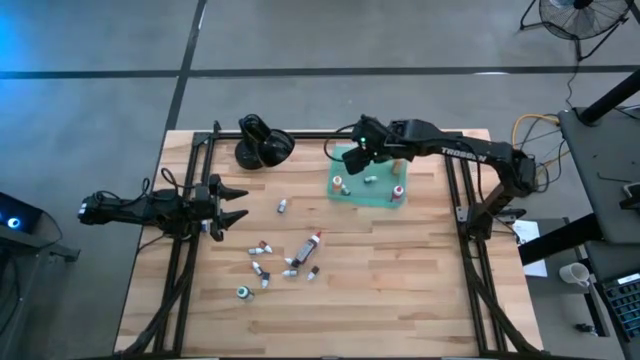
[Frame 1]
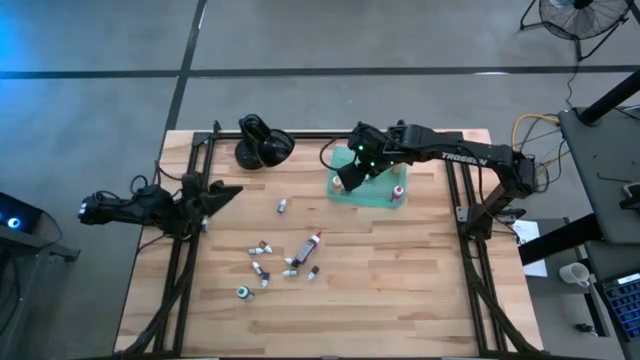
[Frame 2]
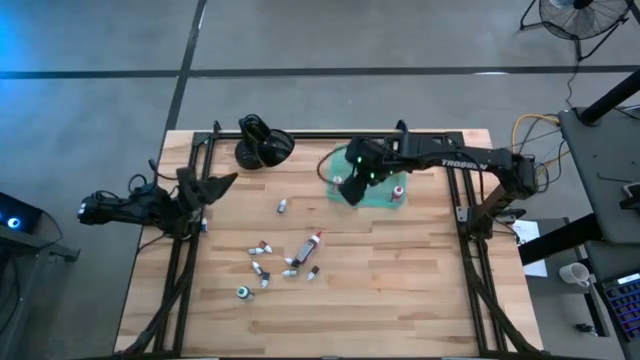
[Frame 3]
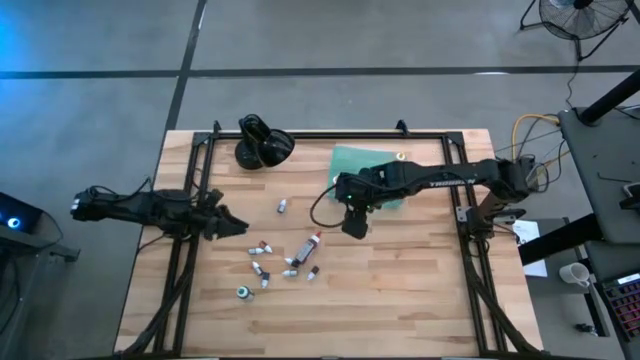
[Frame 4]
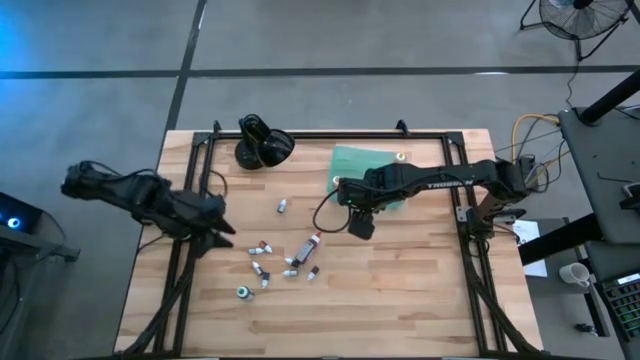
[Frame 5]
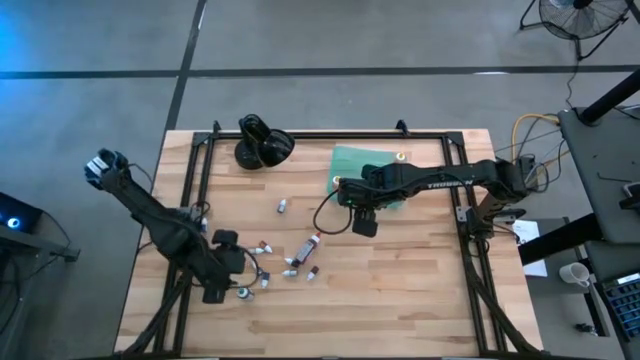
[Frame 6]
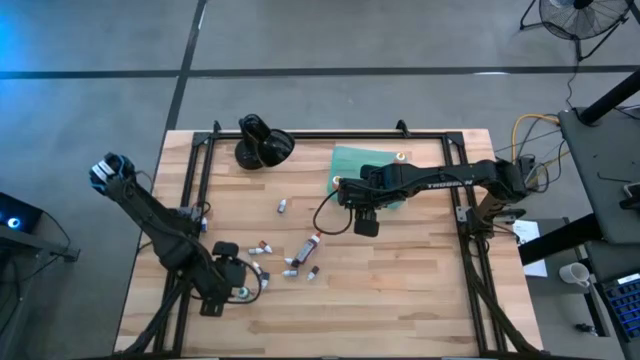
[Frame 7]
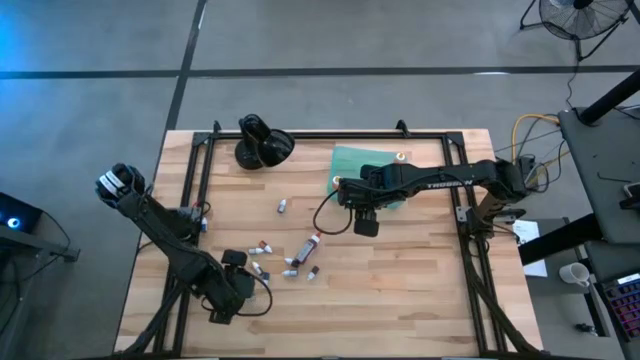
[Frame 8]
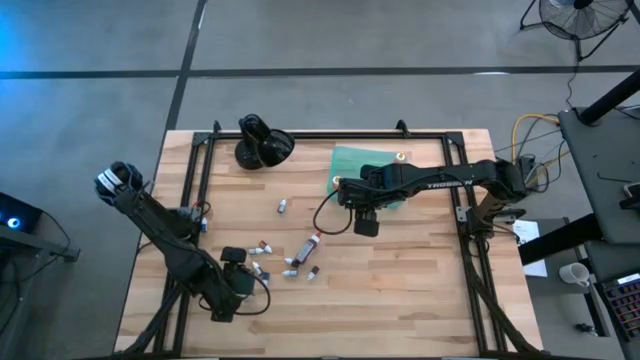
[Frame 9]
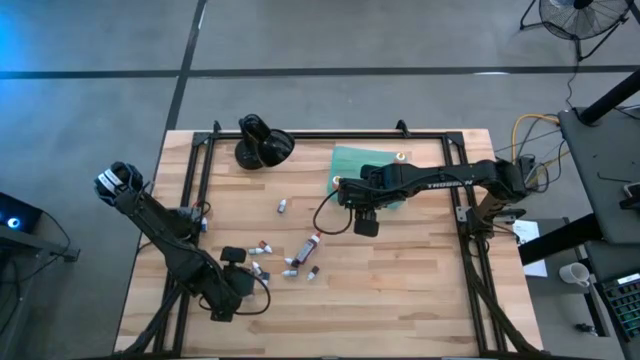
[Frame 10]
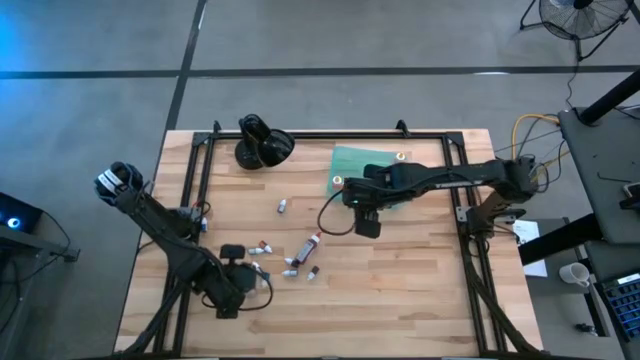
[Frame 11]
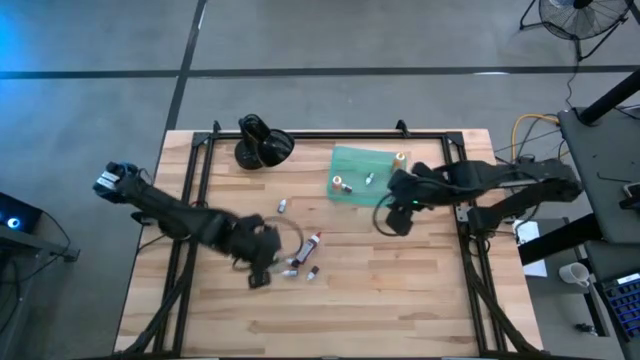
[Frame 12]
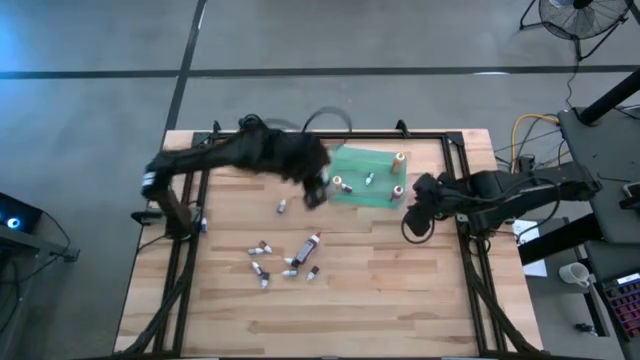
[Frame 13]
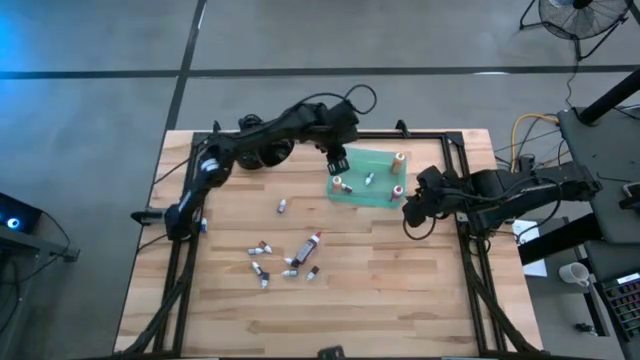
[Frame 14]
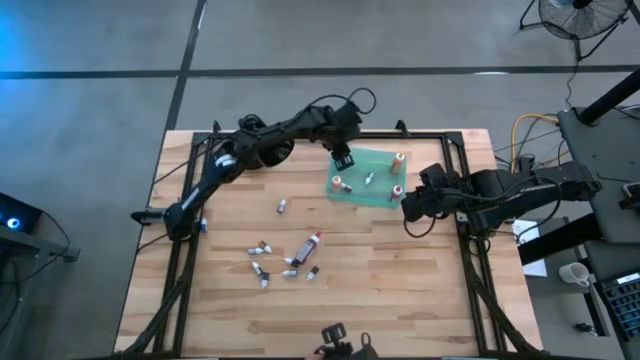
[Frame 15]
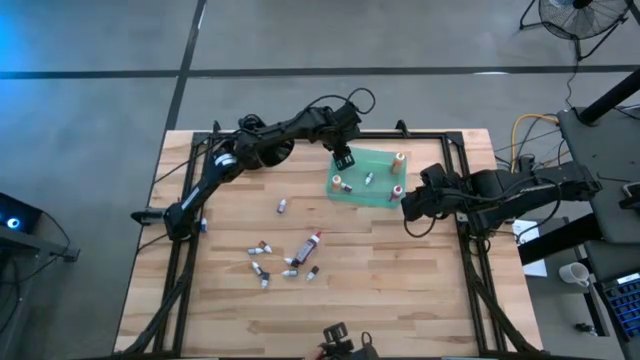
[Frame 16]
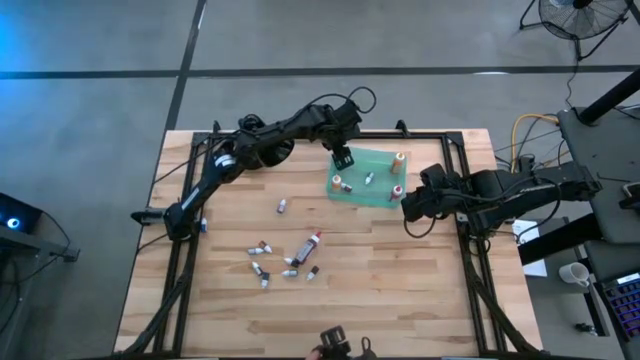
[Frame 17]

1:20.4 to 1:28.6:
Task: Pick & Place food coloring
Put the large green food coloring bottle into the green bin

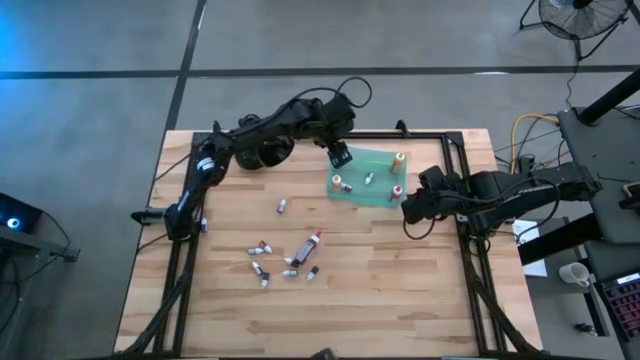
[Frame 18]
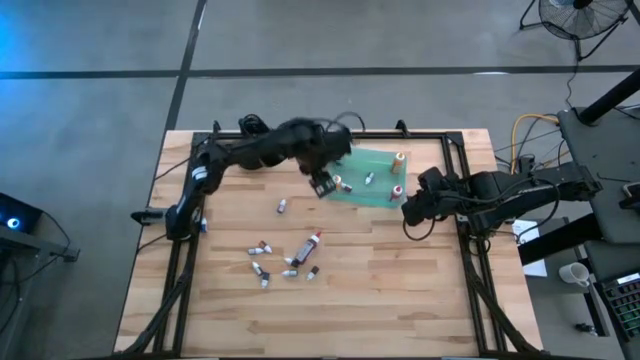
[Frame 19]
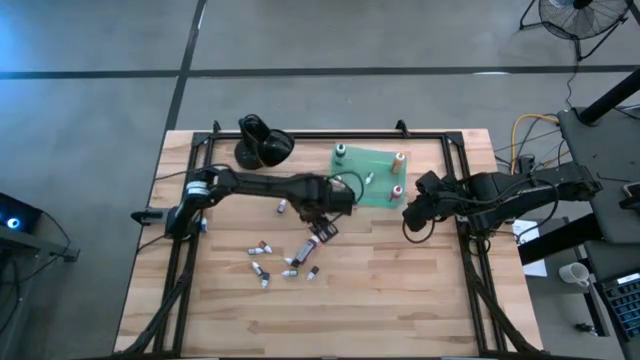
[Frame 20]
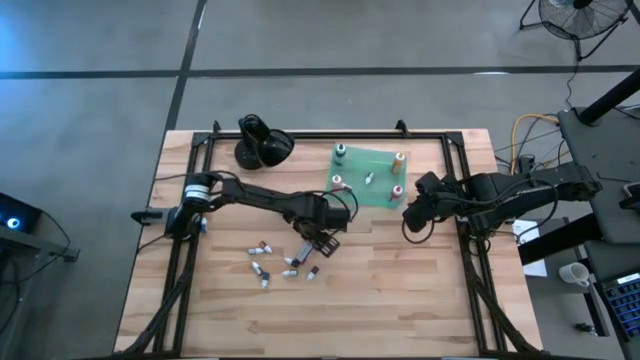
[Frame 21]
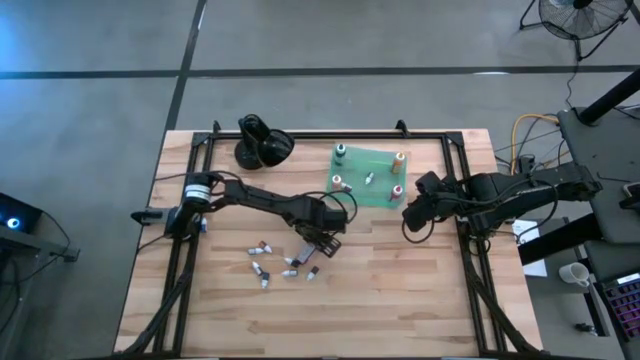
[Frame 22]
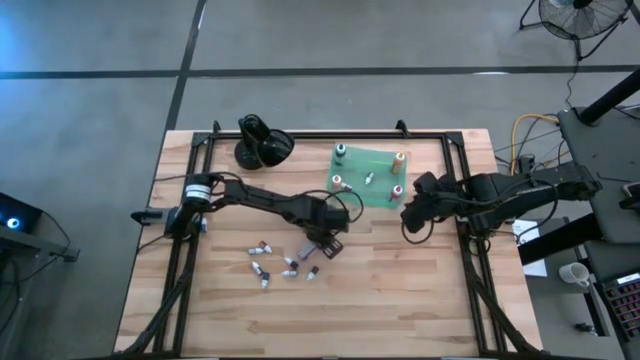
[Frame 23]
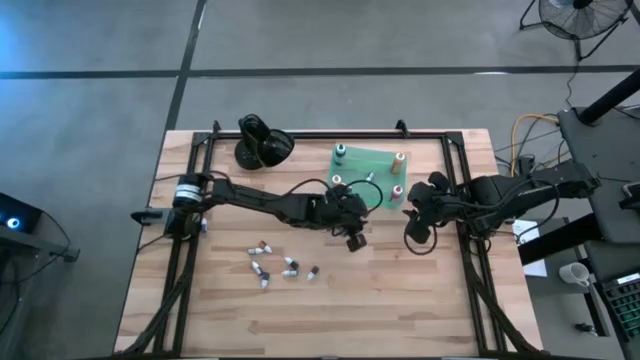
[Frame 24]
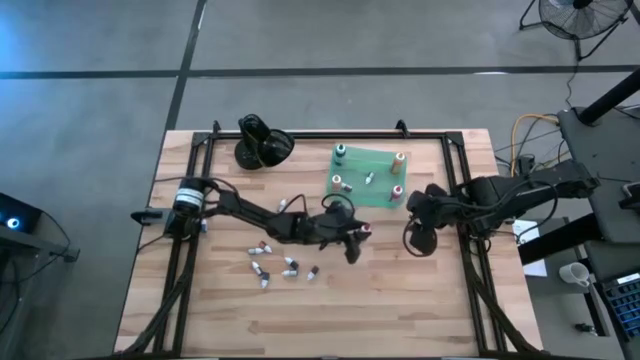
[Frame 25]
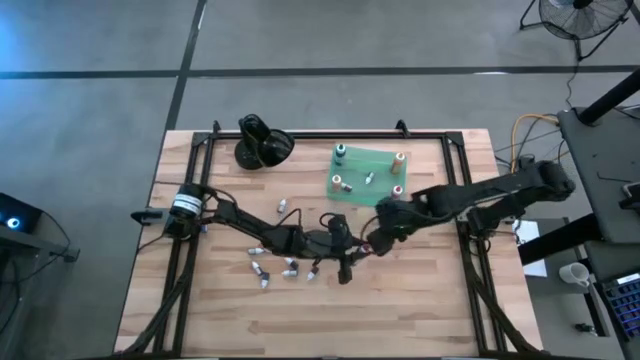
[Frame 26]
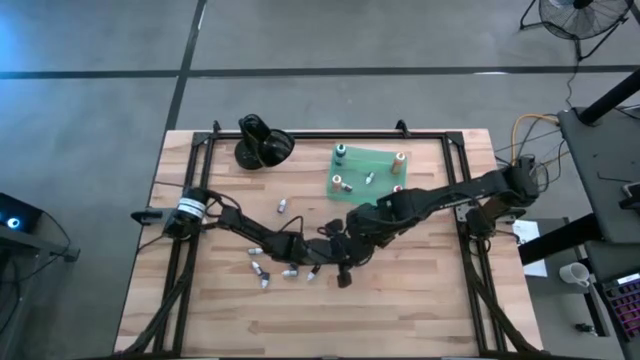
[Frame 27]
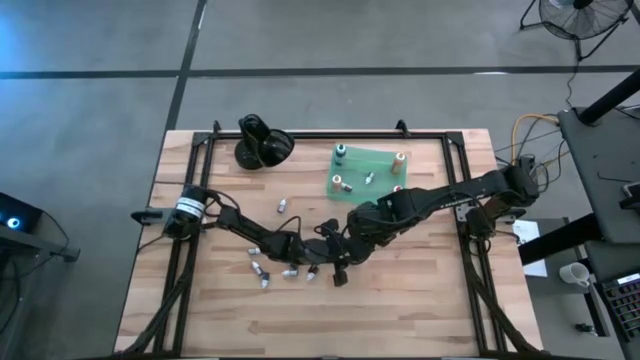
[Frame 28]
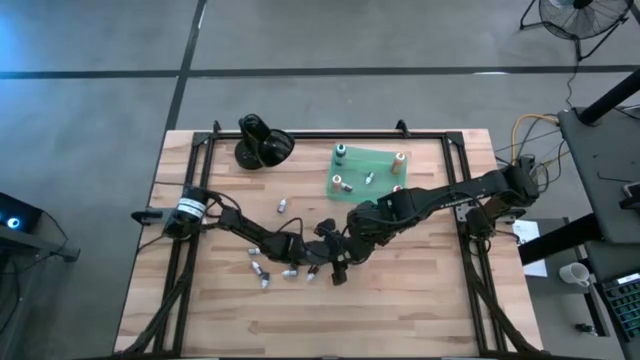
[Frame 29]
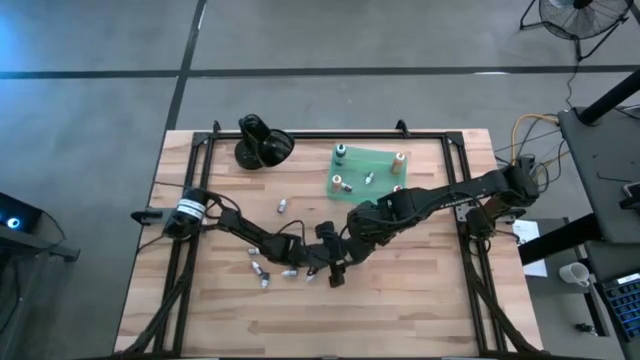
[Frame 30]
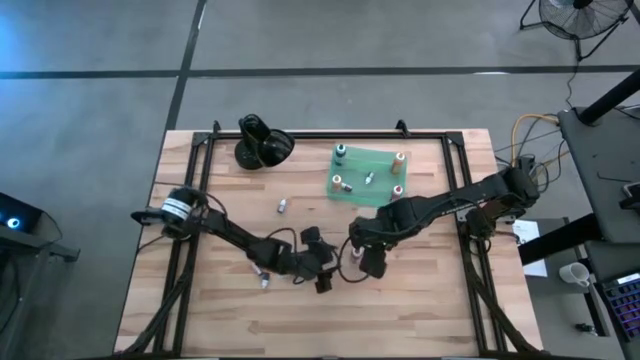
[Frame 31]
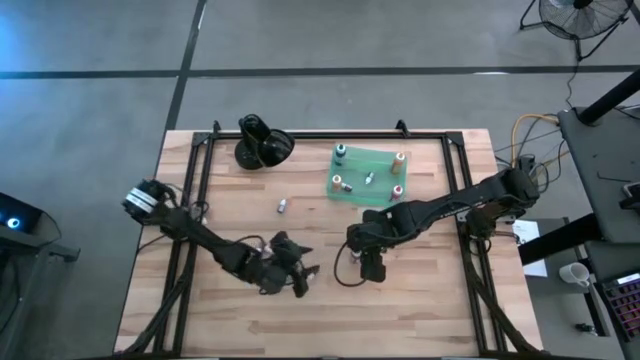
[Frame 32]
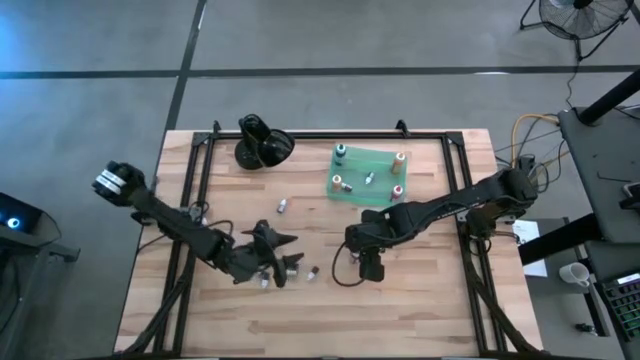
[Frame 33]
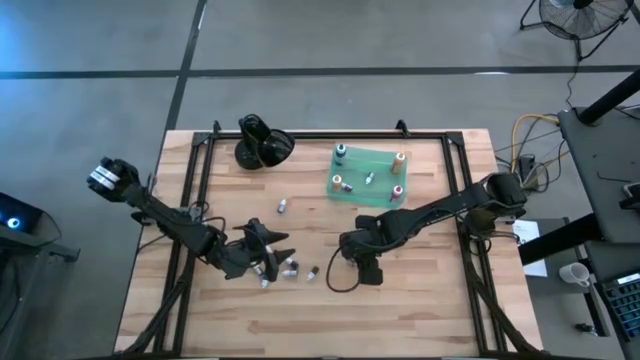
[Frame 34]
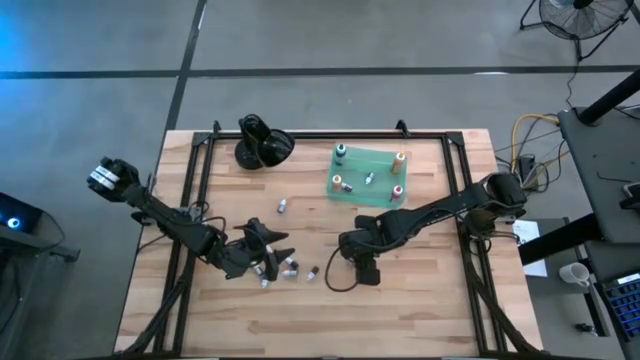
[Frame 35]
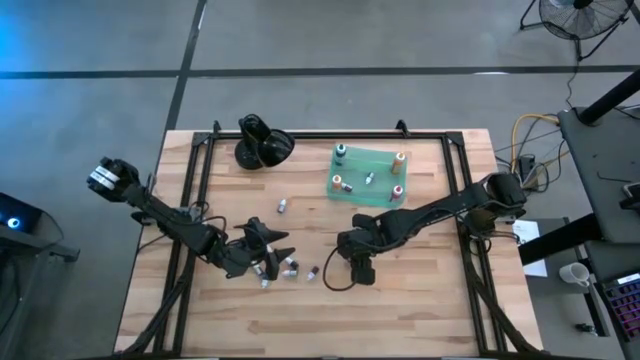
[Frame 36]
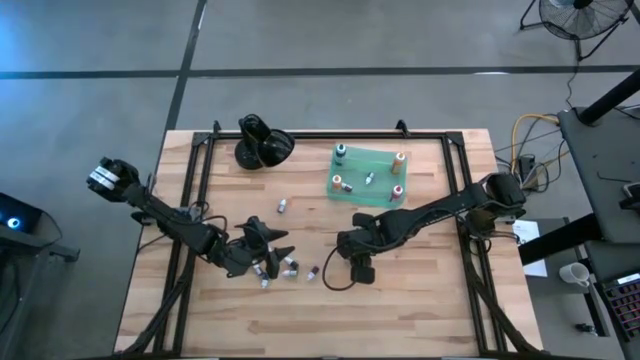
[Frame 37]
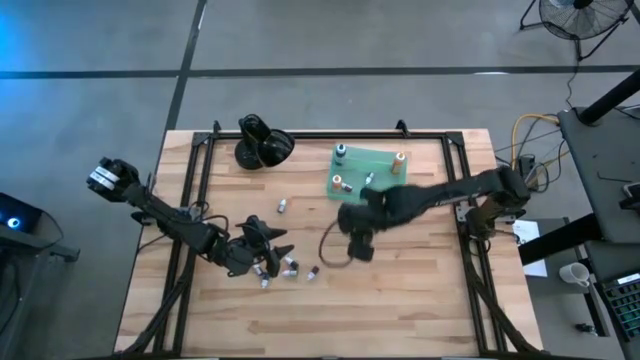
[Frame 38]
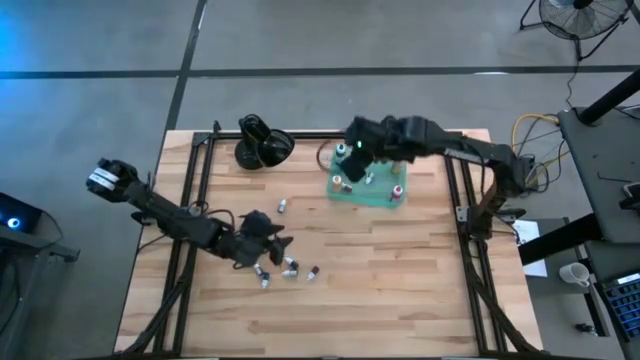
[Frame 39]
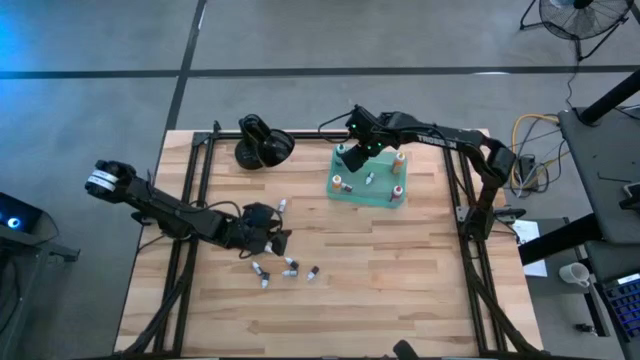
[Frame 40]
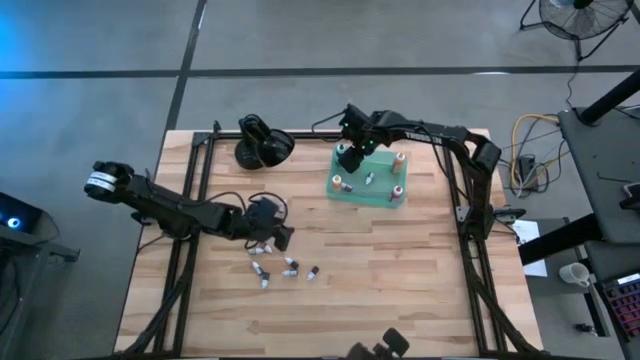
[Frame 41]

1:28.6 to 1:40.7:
Put the large red food coloring bottle into the green bin

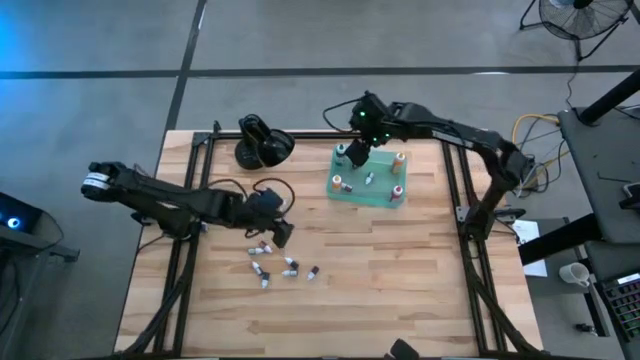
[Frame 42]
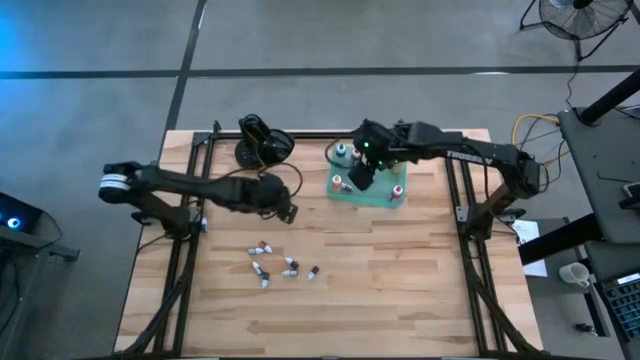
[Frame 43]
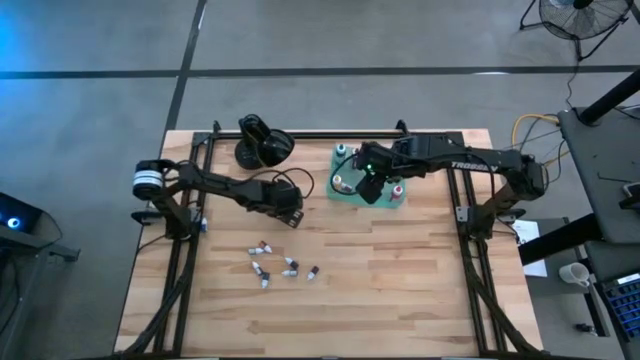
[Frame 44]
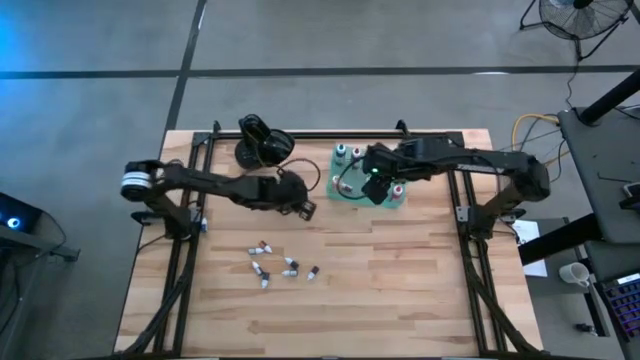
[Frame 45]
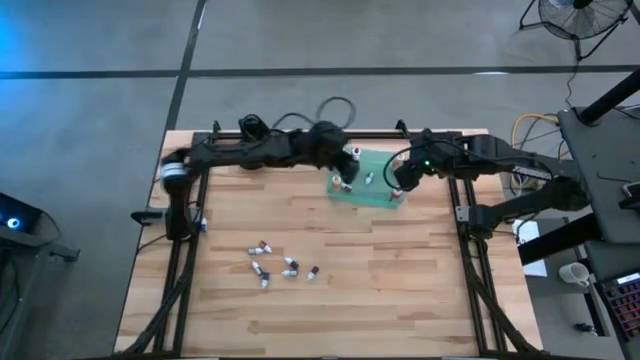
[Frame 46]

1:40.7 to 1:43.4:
Put the violet food coloring bottle into the green bin
